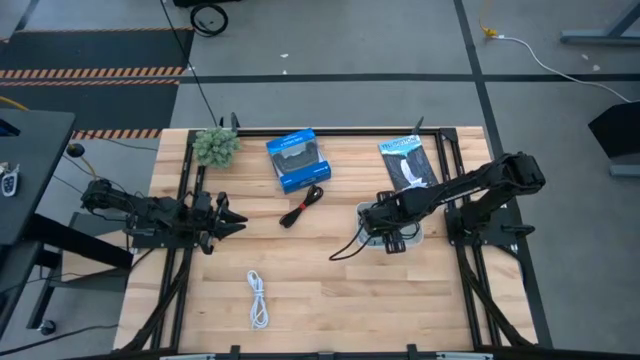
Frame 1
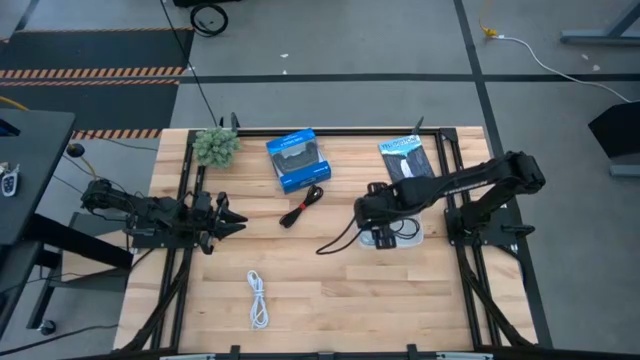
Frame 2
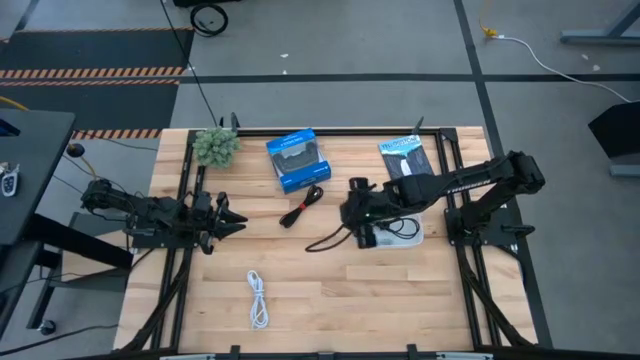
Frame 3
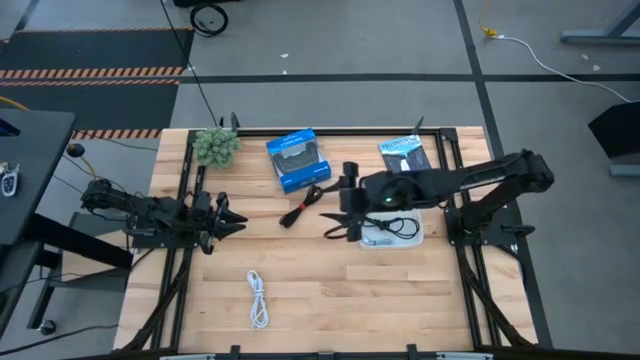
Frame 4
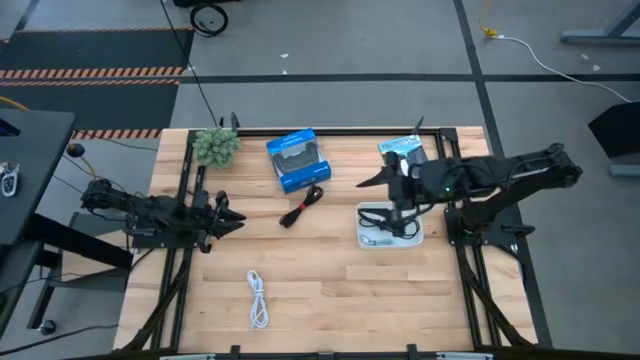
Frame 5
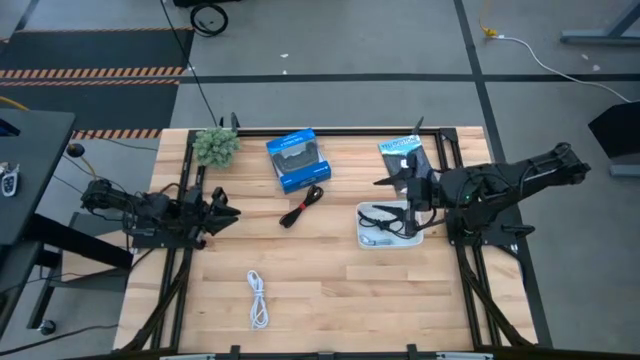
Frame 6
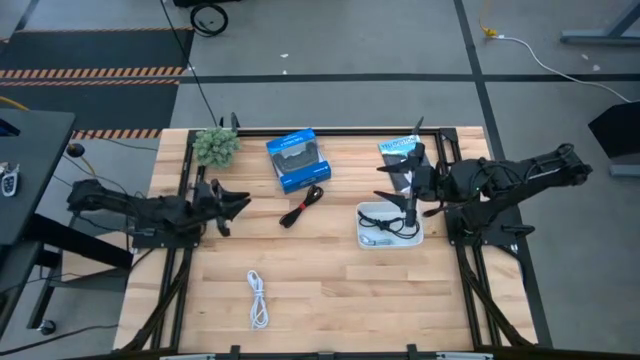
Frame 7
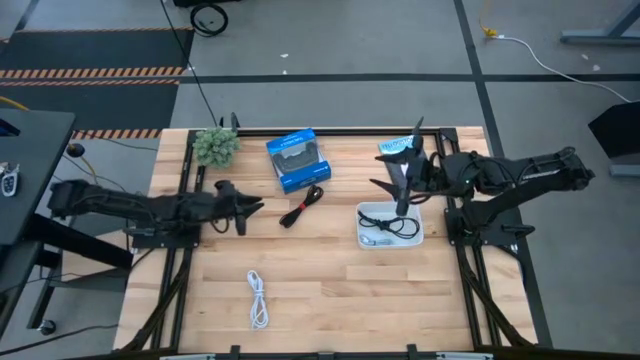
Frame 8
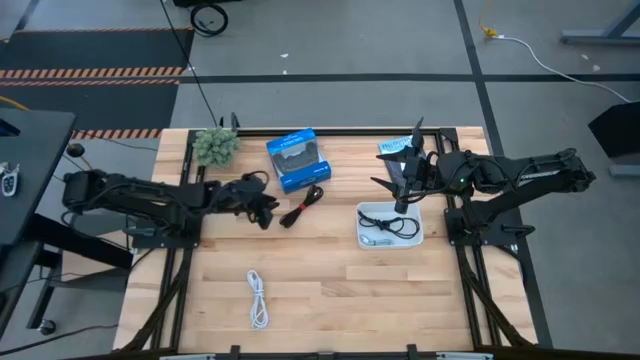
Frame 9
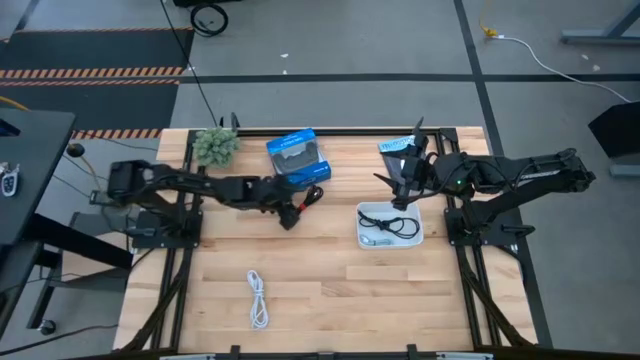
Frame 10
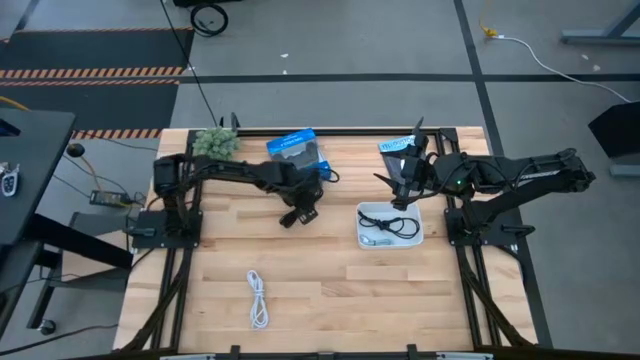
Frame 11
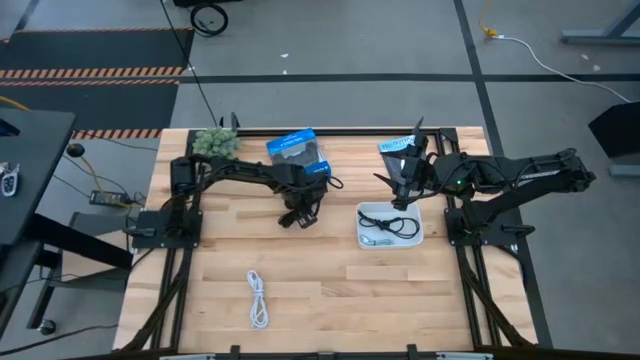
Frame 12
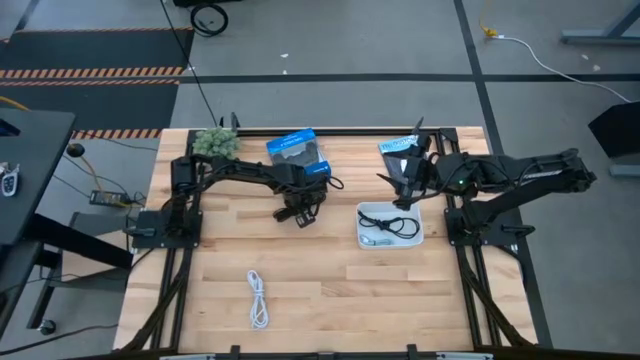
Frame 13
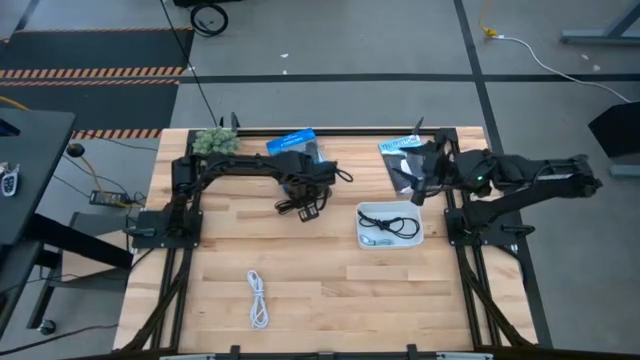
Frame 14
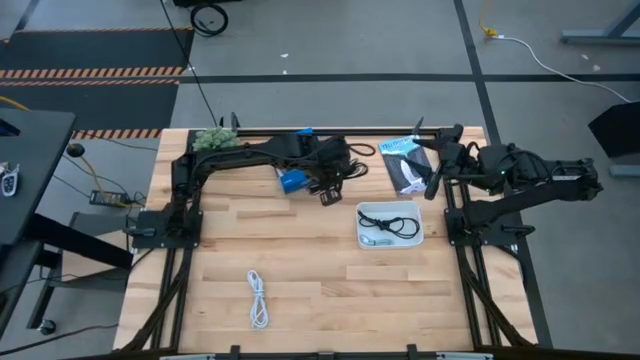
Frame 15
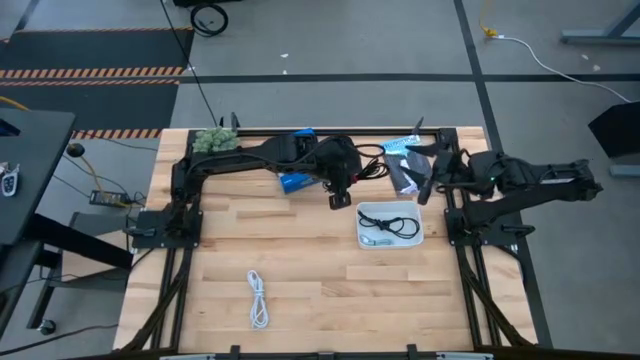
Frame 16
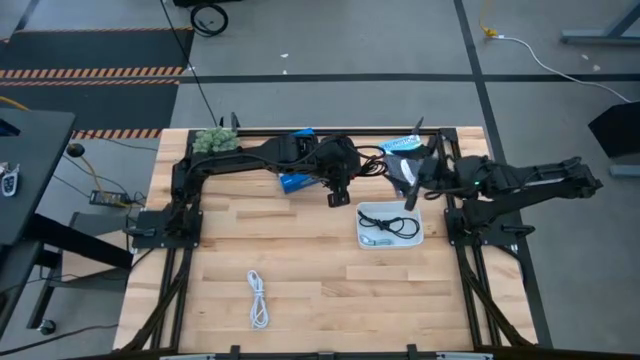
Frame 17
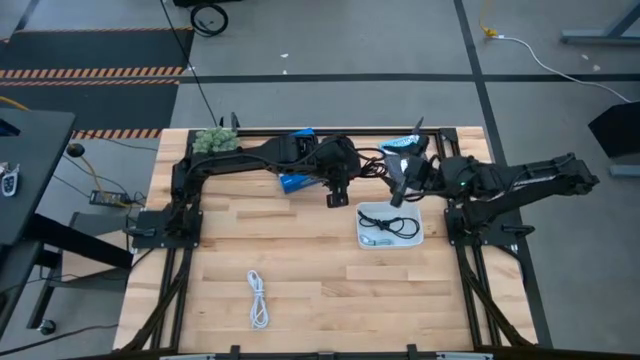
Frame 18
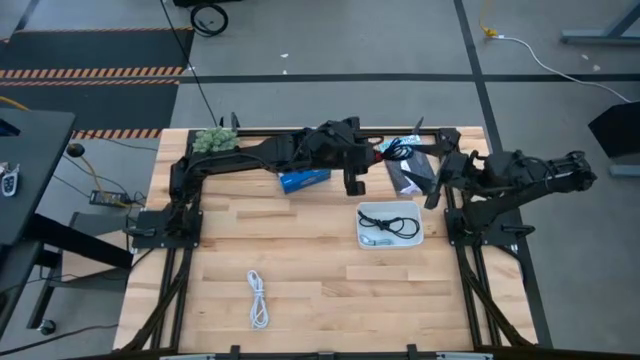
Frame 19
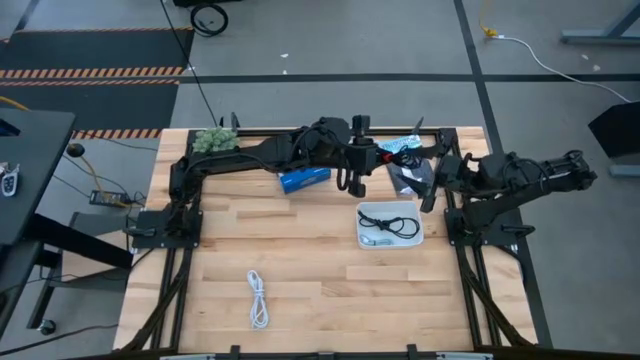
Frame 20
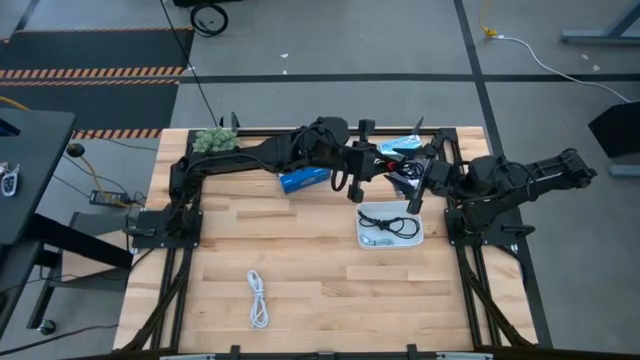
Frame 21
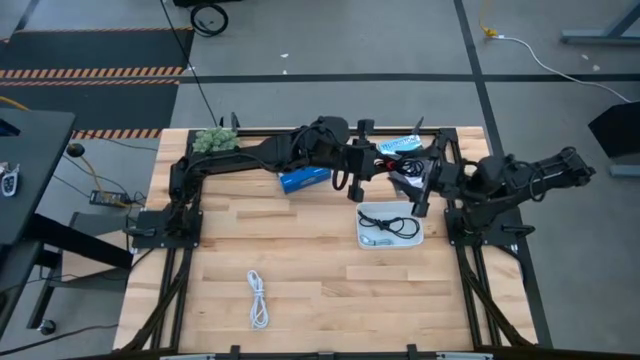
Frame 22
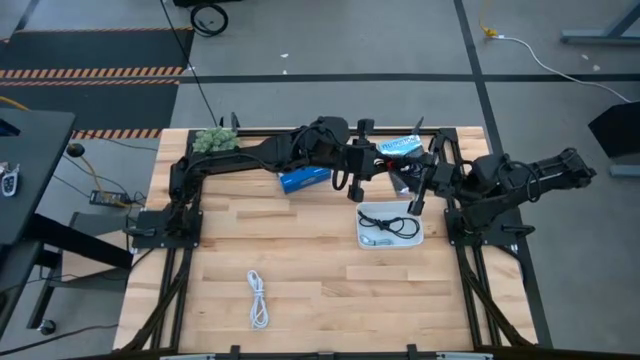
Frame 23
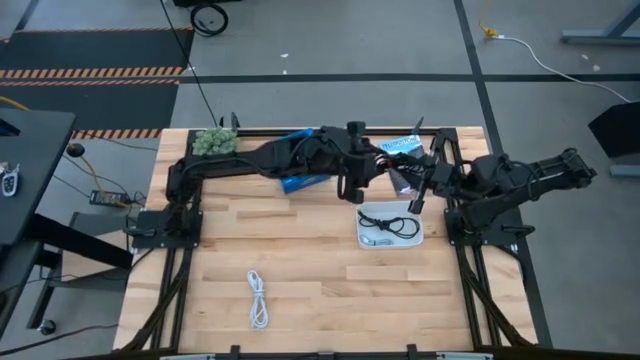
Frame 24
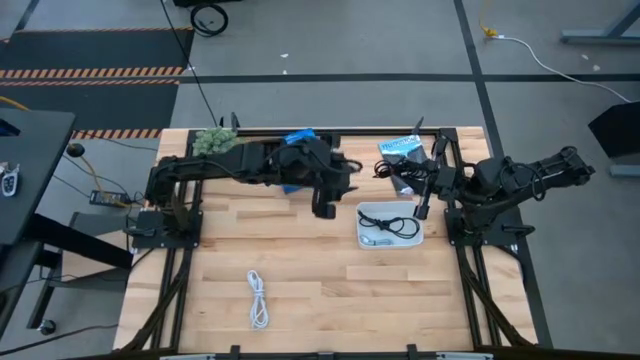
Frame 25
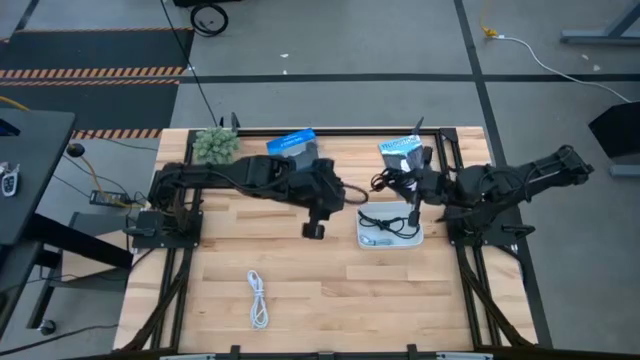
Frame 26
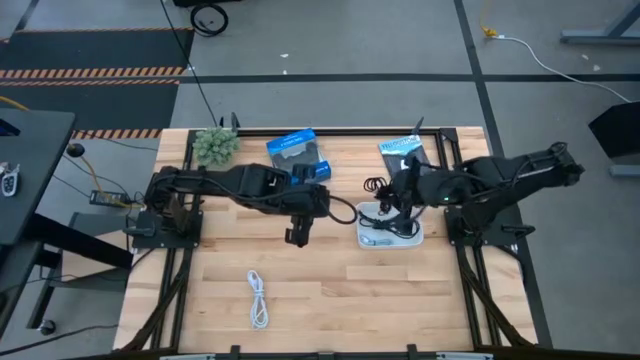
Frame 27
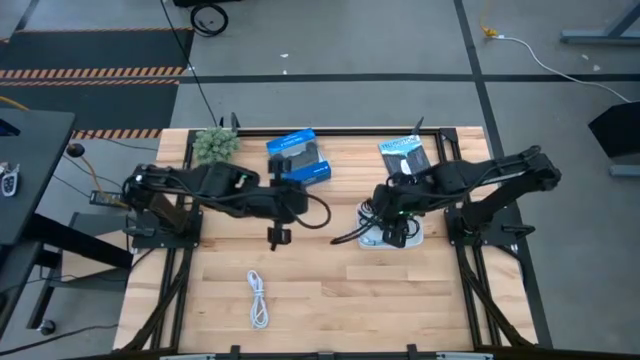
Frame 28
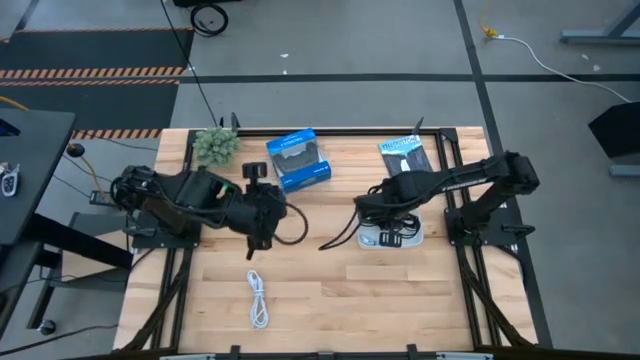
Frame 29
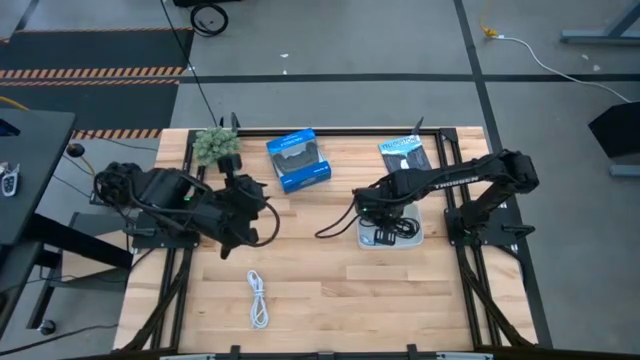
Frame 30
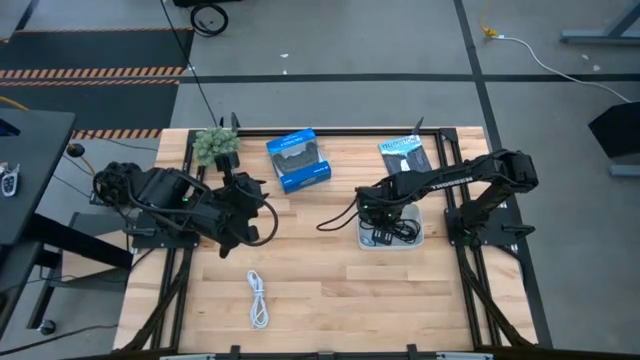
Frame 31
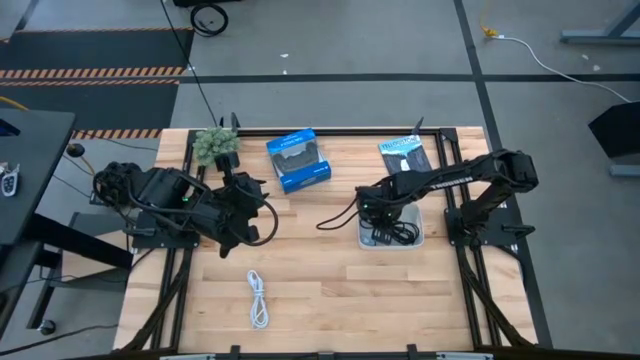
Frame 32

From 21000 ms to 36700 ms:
Task: Pick and place USB-C Cables
Put the black USB cable into the white bin

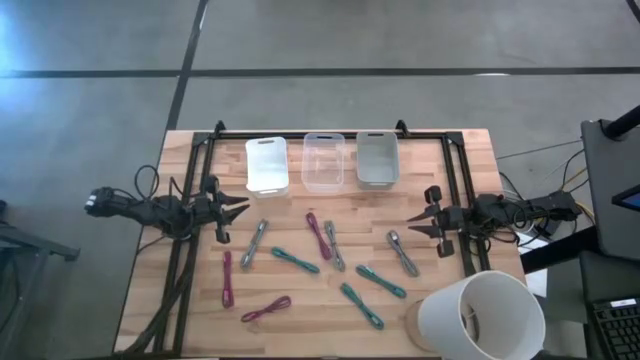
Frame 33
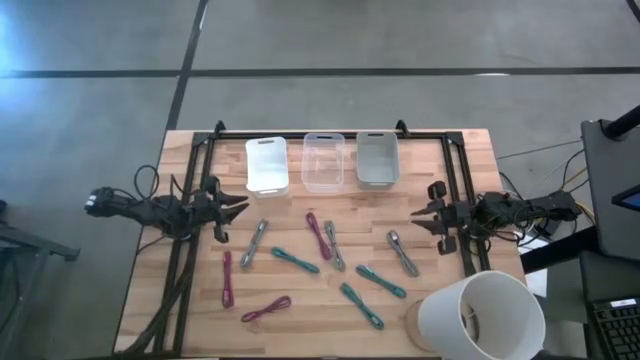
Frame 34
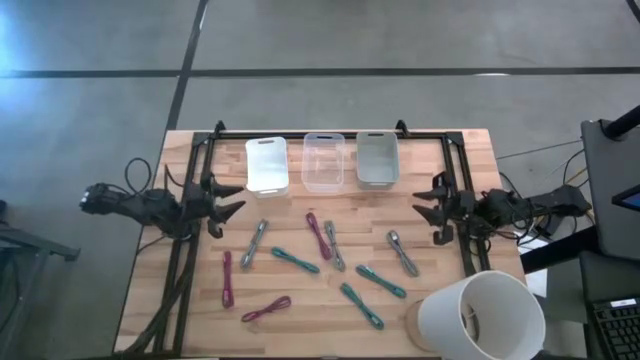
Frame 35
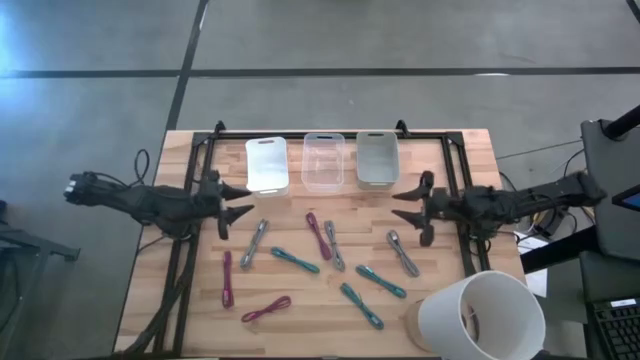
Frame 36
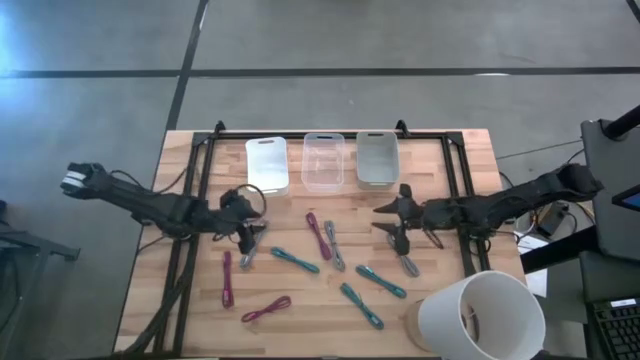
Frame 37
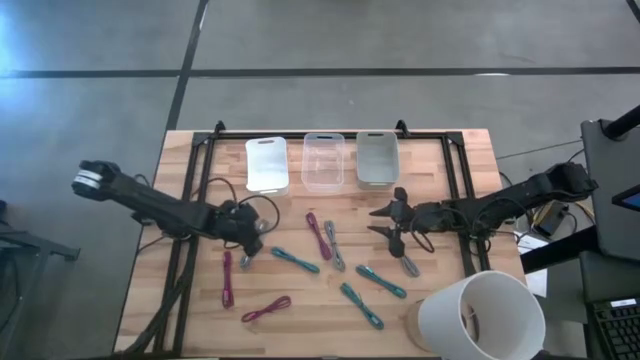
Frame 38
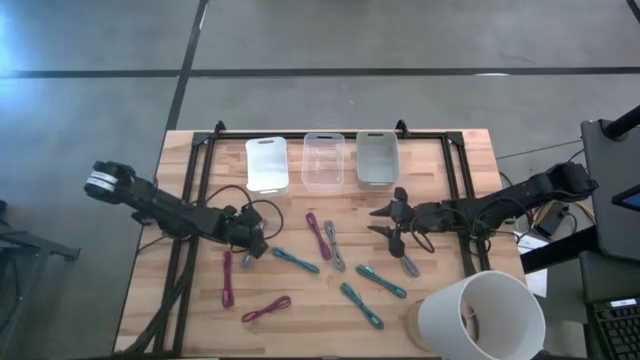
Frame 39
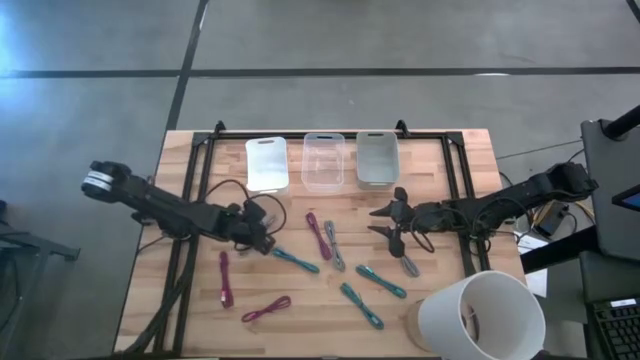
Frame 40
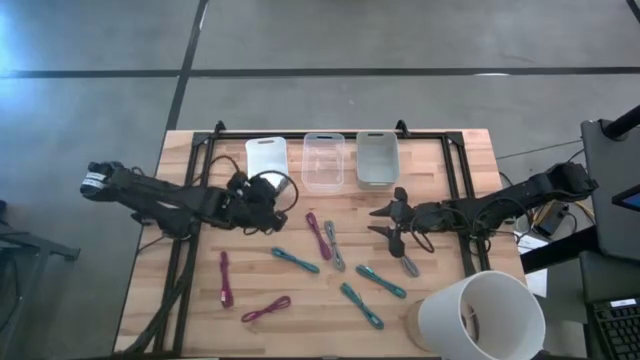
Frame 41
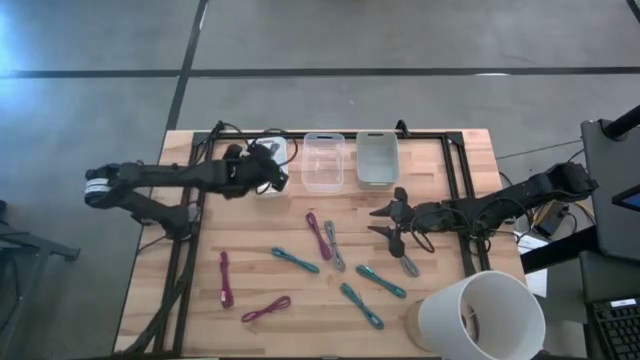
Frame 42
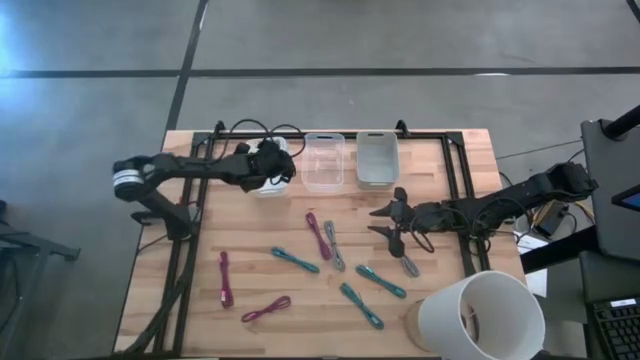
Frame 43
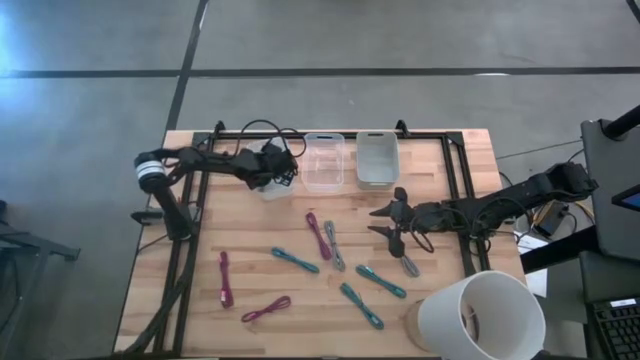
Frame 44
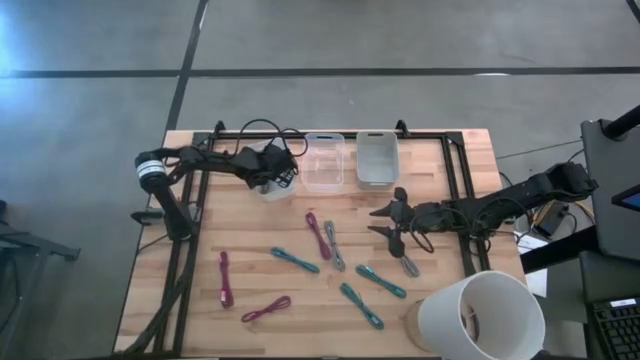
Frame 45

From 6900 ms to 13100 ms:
Task: Pick & Place USB Port
Put the left gray charger cable into the white bin
